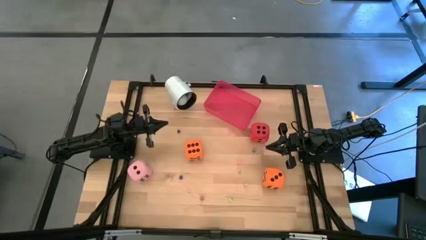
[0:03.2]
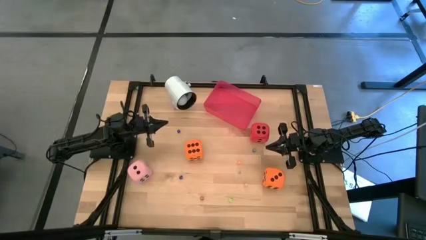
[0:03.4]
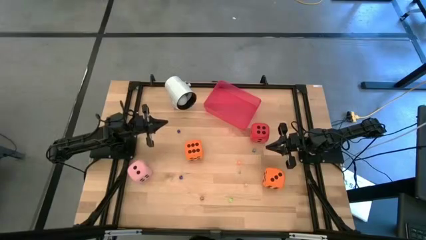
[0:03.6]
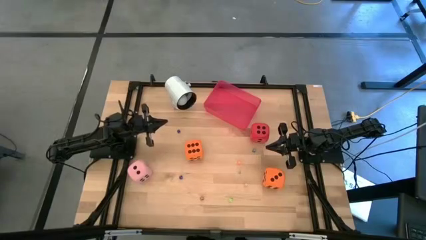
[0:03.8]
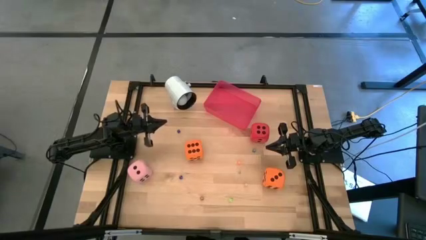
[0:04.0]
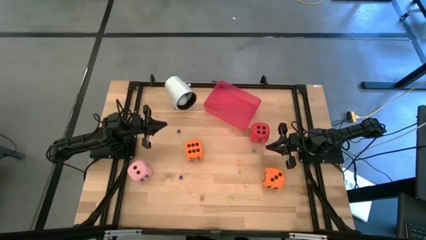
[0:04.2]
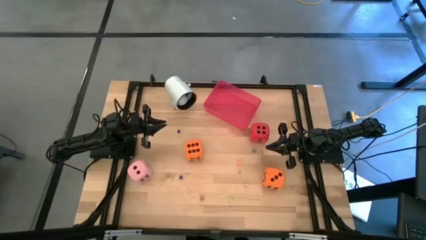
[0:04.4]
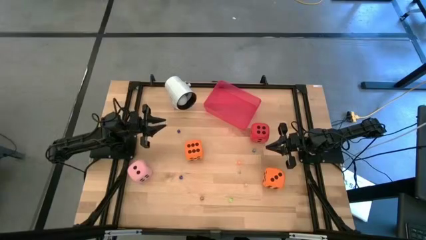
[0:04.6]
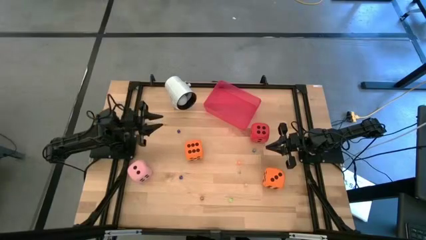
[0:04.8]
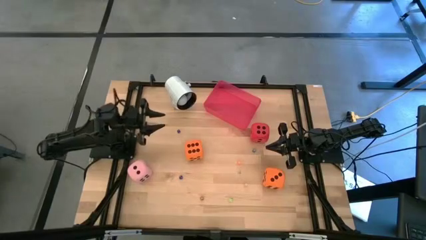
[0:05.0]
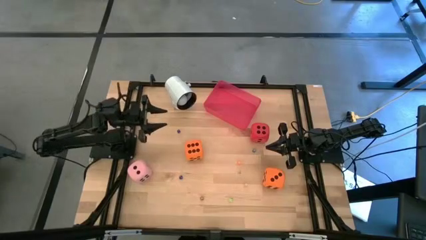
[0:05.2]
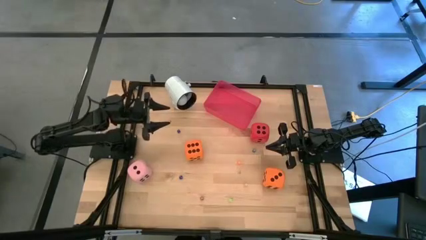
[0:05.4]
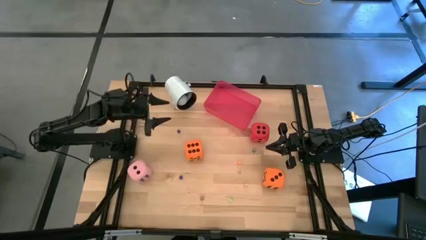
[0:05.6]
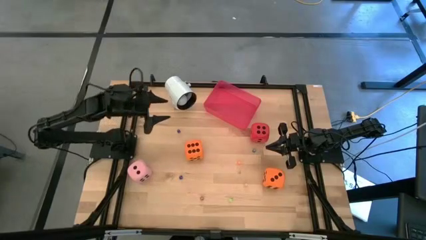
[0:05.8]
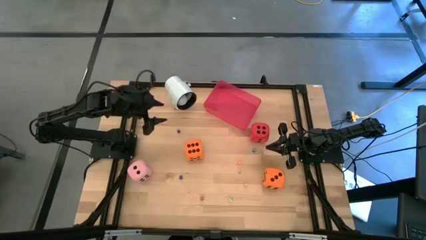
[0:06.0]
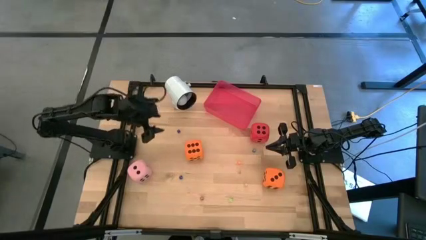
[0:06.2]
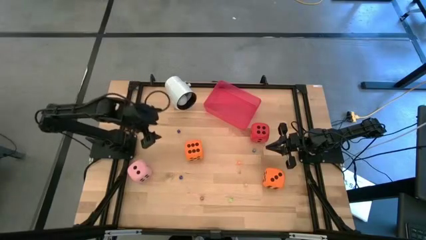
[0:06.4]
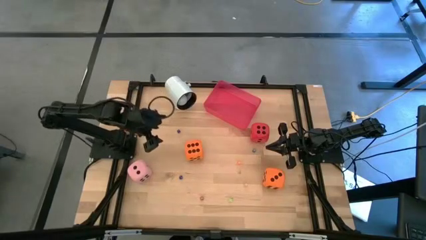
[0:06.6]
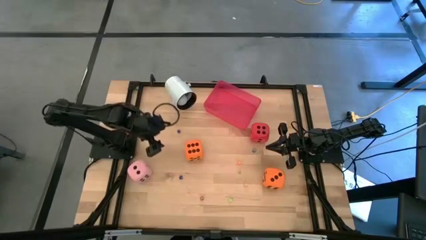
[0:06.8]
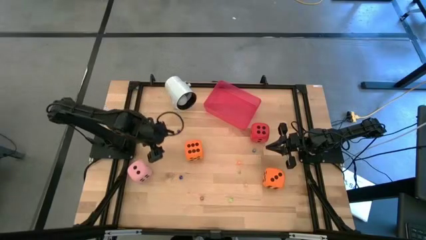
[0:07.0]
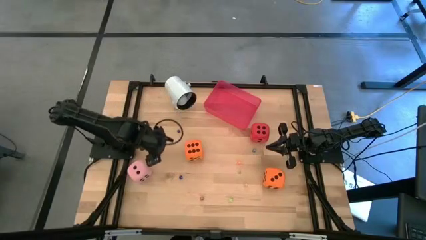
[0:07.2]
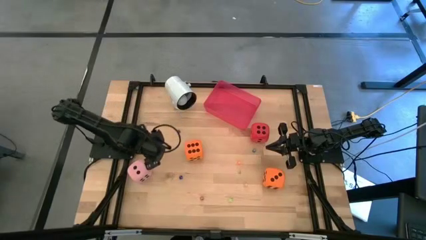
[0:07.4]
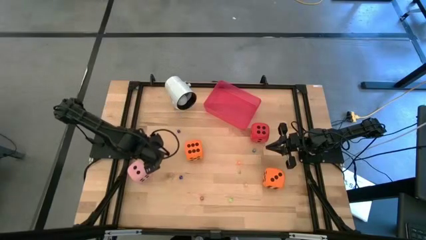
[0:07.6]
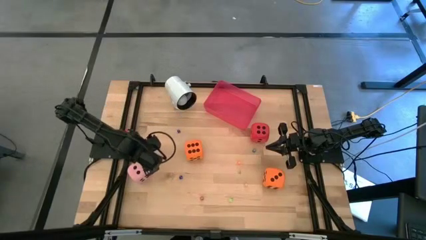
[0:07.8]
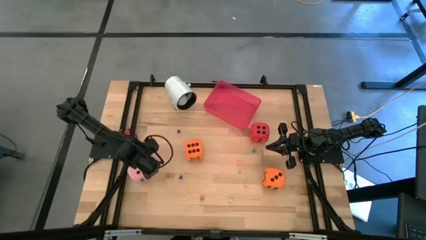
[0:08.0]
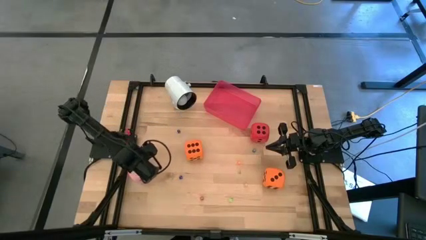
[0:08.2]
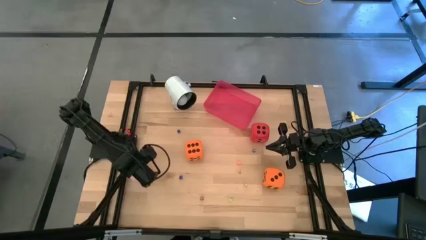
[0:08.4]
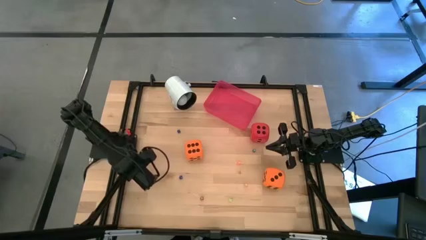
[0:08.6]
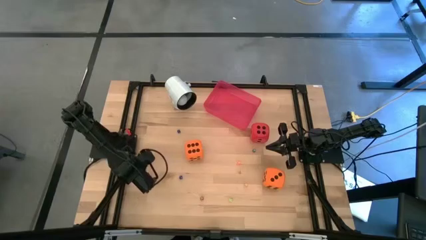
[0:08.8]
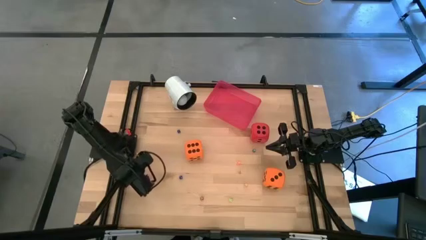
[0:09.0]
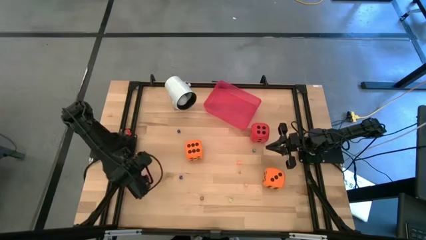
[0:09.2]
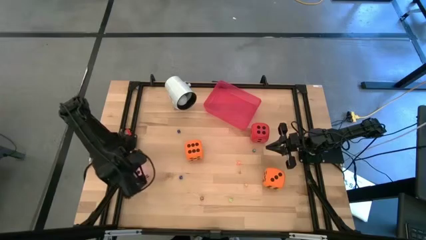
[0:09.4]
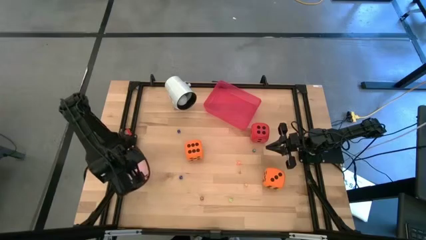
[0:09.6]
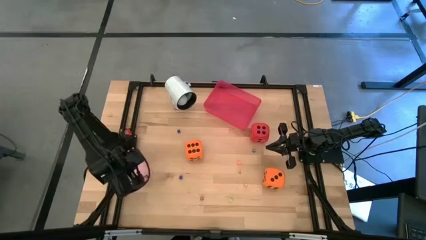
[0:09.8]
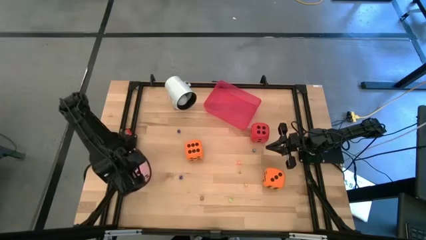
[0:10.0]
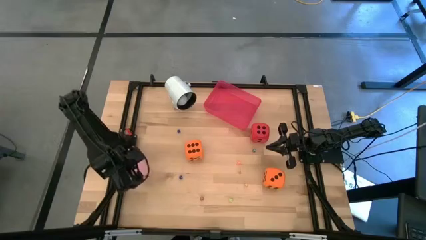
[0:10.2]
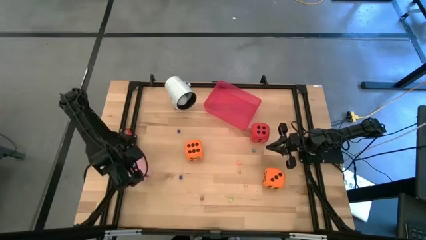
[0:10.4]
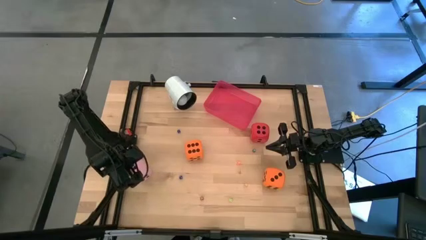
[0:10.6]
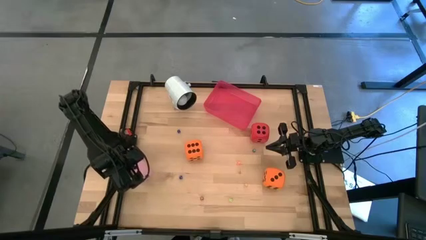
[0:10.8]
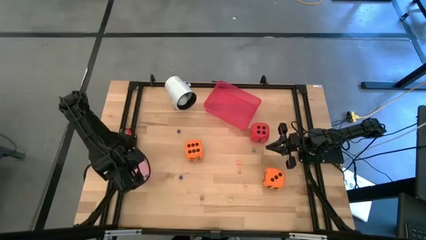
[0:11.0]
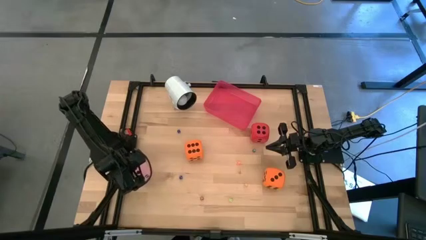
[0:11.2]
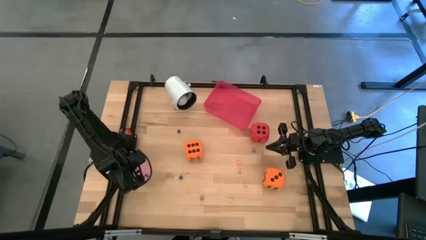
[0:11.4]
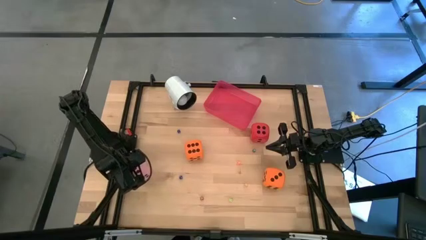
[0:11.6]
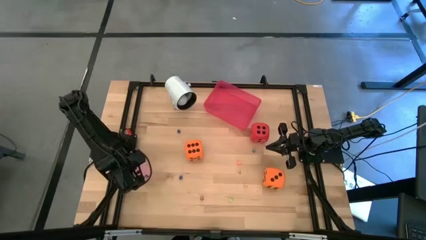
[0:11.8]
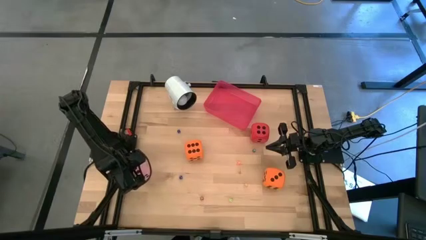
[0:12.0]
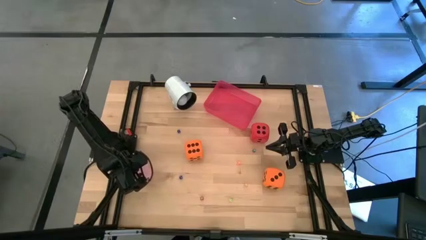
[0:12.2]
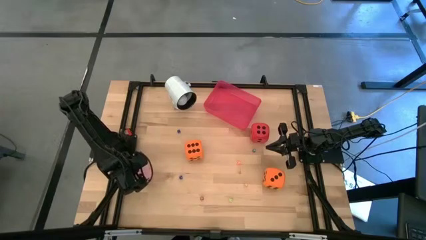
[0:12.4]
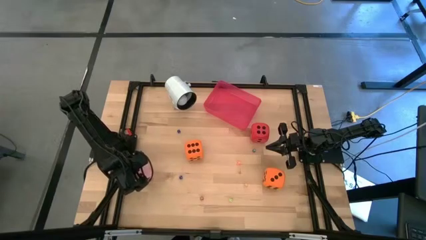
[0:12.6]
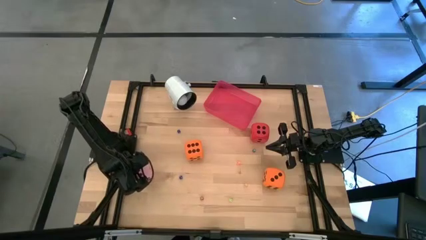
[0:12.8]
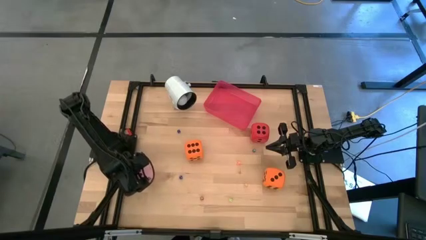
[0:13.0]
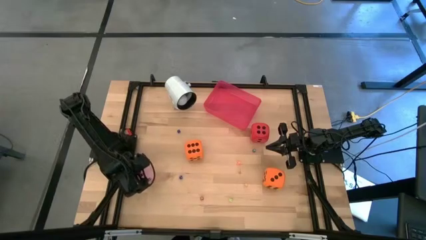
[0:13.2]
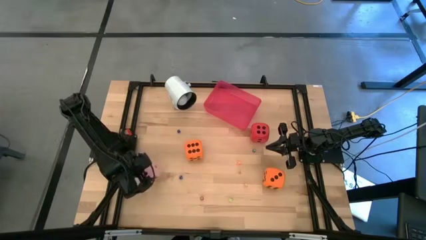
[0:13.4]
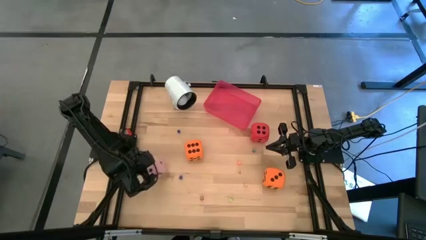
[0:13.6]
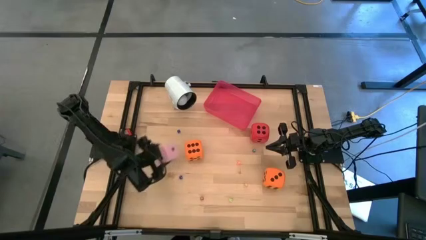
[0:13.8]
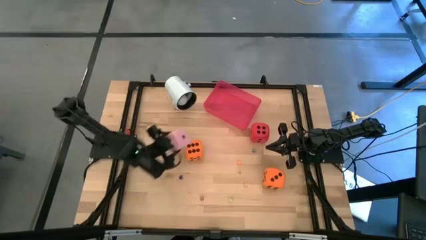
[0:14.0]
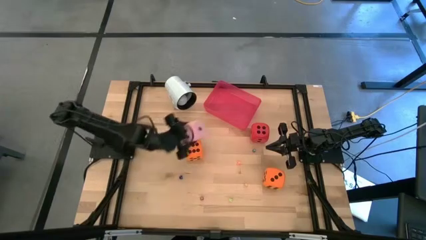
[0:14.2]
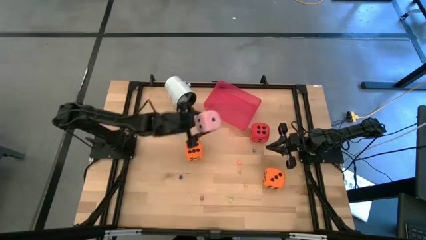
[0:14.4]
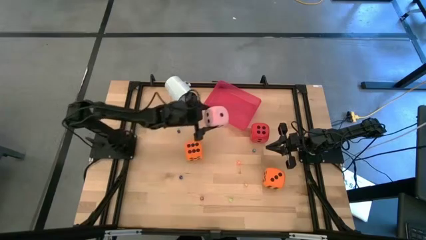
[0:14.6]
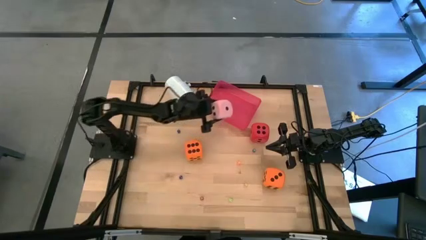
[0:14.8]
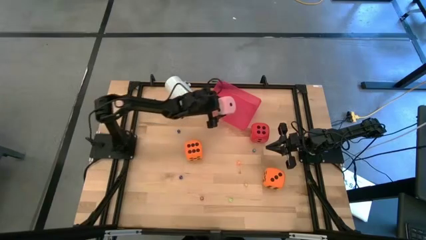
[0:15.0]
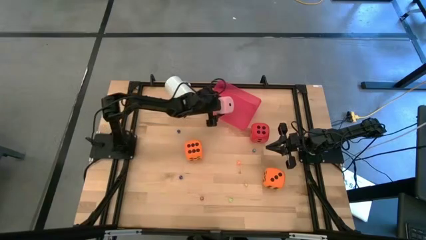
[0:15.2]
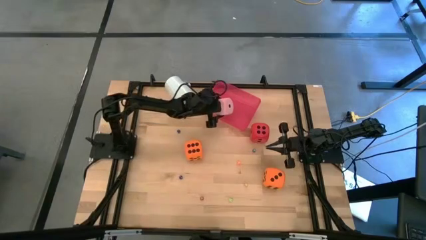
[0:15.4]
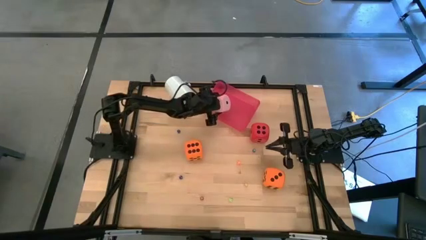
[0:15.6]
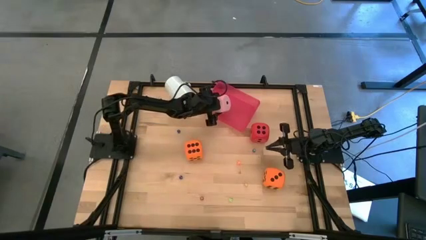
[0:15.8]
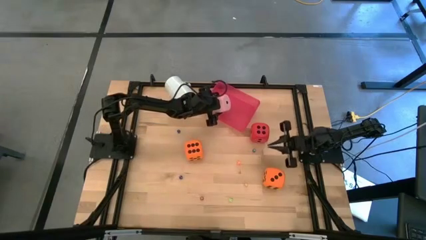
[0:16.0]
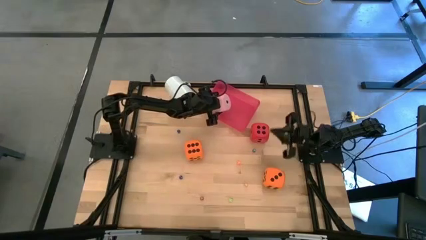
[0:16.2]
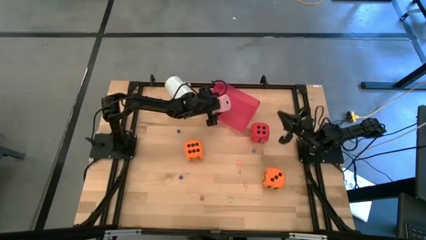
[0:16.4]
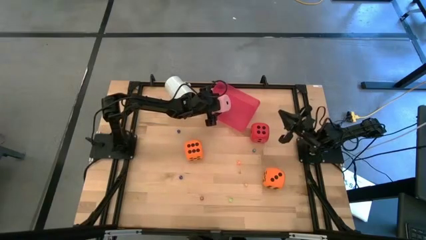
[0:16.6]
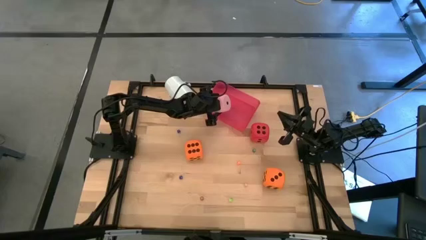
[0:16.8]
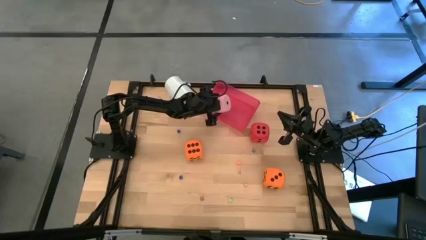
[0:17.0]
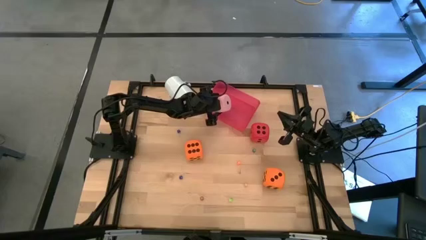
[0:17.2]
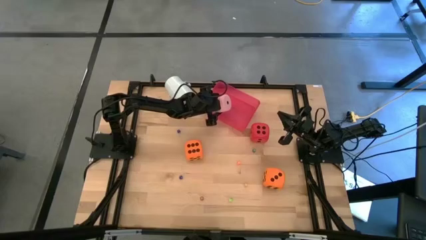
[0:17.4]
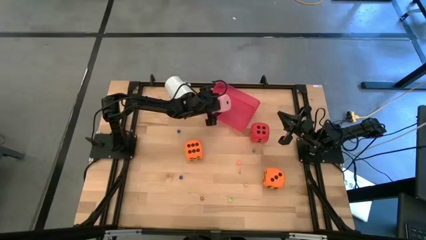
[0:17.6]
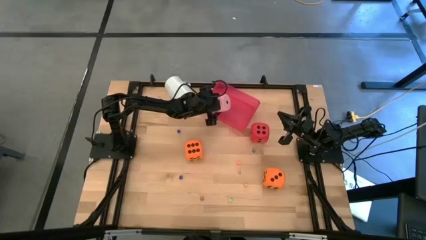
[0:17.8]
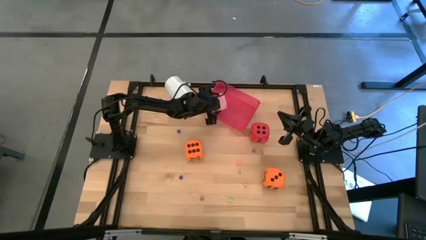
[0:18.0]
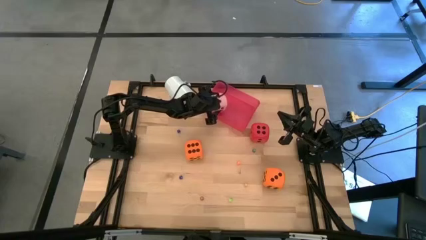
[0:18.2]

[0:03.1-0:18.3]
Task: Pick & Place Dice
Put the big pink die into the red bin
